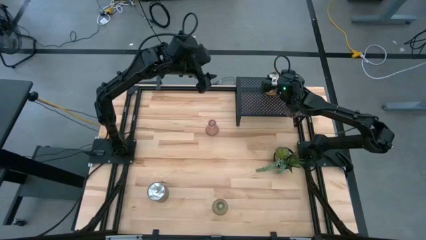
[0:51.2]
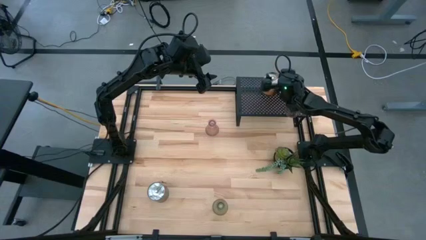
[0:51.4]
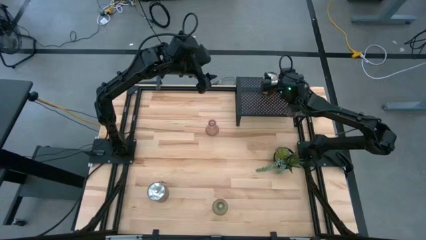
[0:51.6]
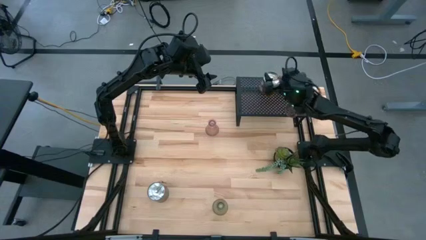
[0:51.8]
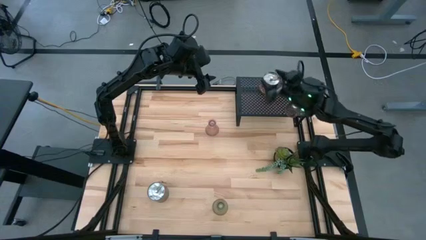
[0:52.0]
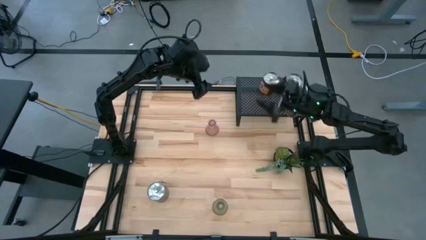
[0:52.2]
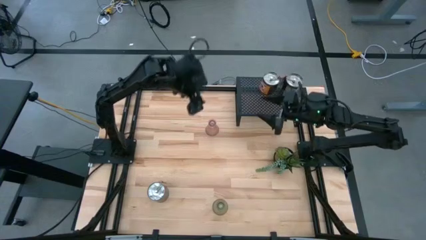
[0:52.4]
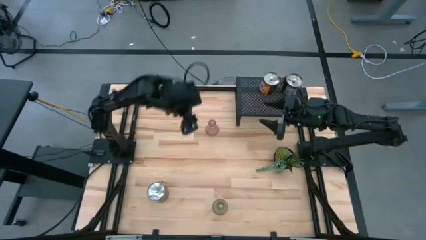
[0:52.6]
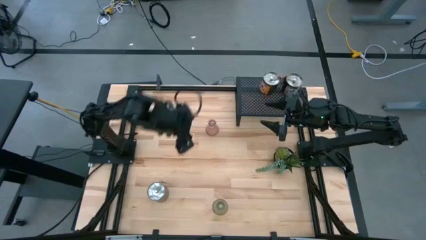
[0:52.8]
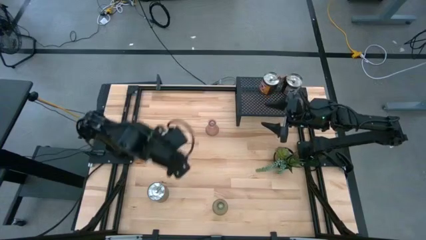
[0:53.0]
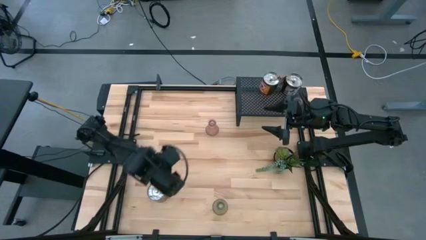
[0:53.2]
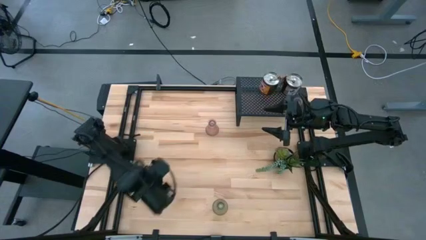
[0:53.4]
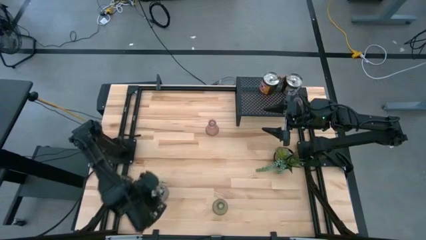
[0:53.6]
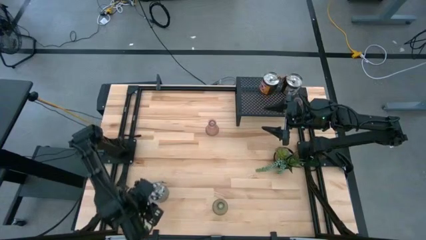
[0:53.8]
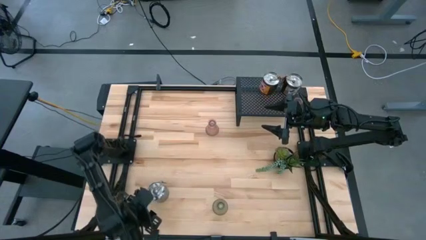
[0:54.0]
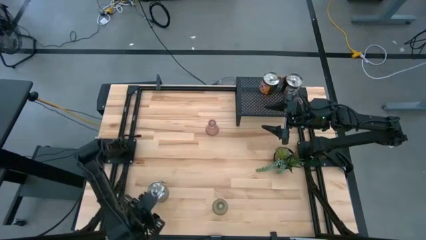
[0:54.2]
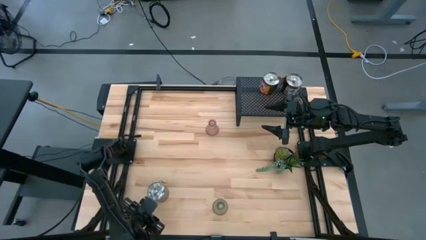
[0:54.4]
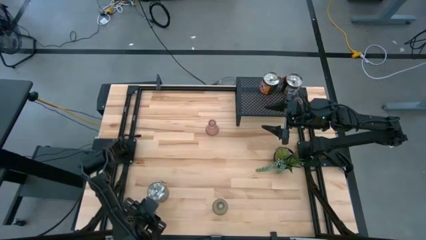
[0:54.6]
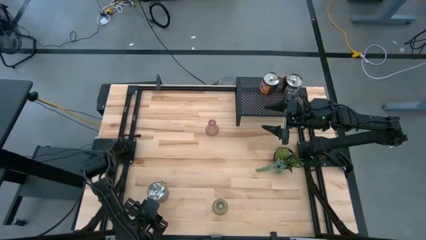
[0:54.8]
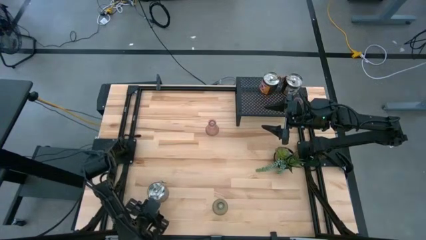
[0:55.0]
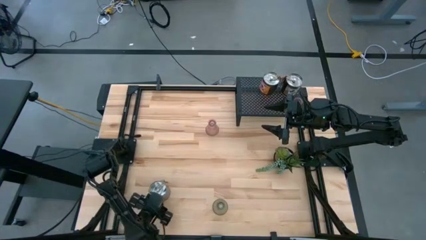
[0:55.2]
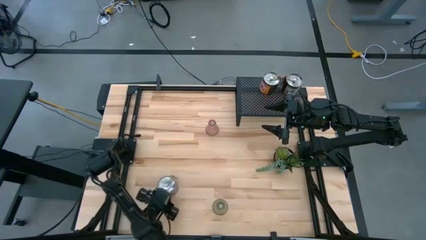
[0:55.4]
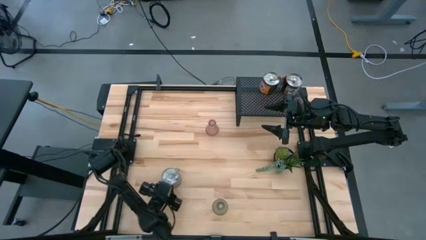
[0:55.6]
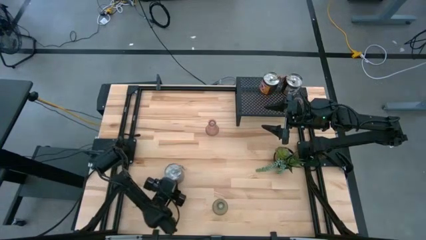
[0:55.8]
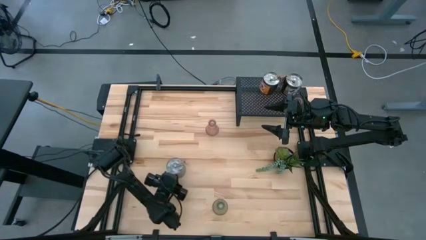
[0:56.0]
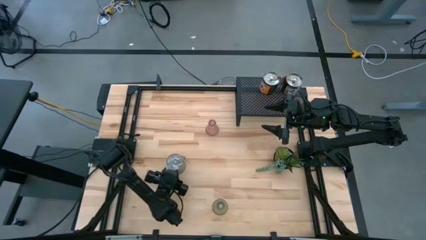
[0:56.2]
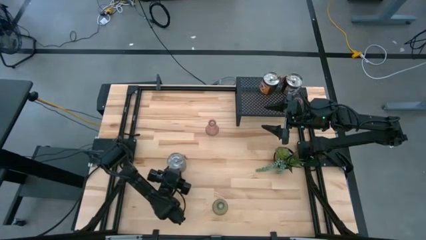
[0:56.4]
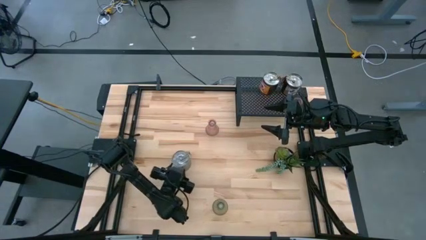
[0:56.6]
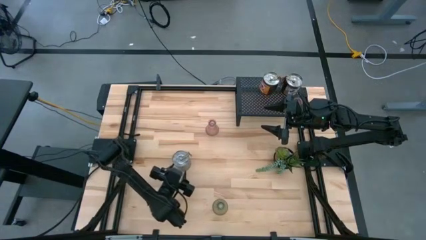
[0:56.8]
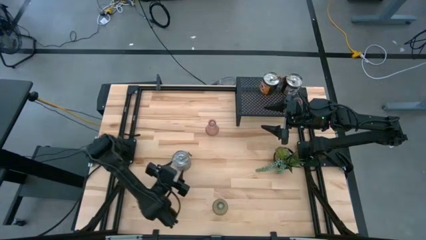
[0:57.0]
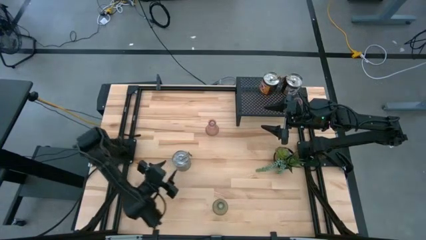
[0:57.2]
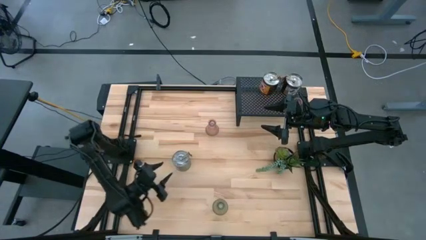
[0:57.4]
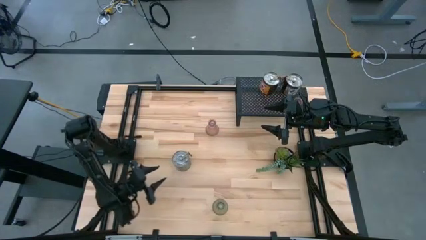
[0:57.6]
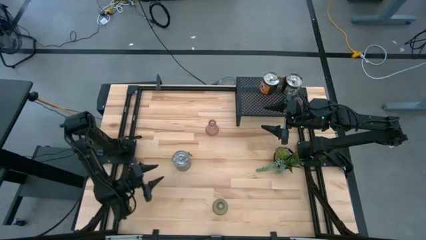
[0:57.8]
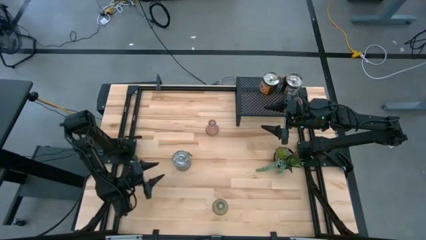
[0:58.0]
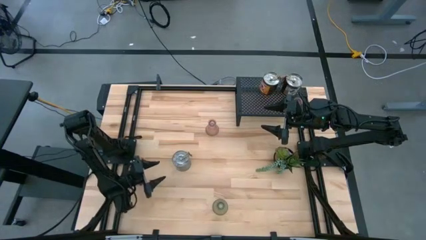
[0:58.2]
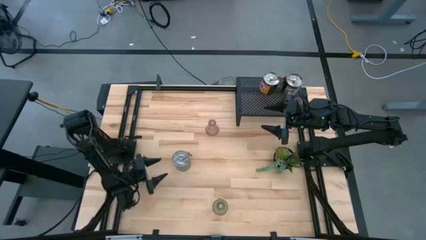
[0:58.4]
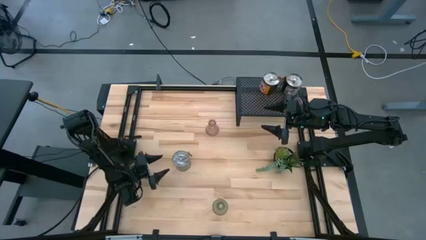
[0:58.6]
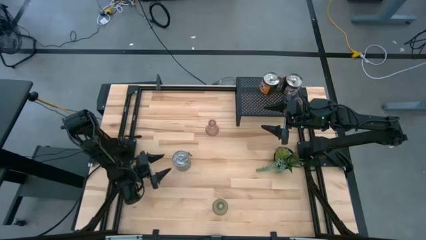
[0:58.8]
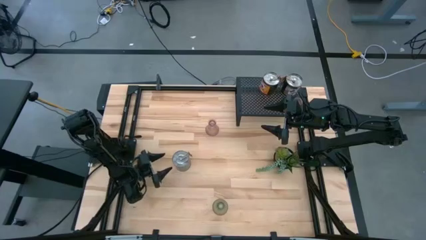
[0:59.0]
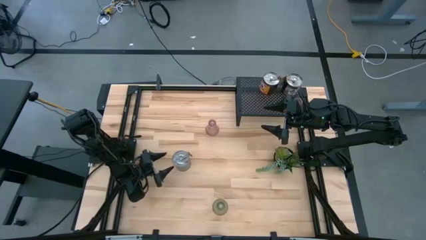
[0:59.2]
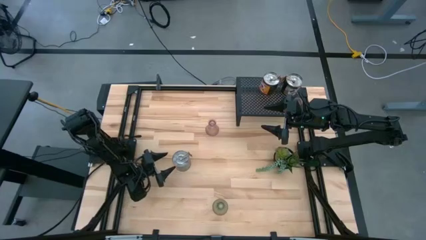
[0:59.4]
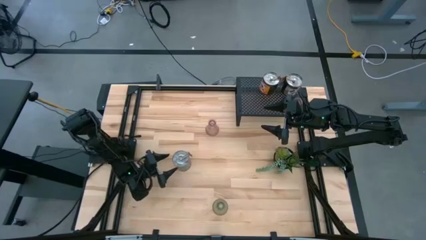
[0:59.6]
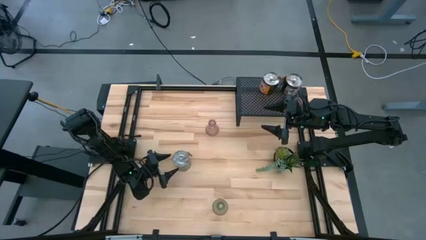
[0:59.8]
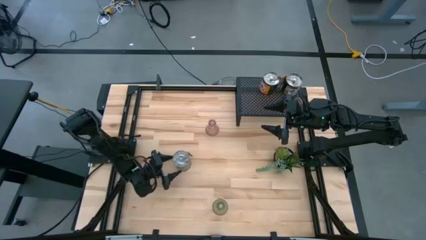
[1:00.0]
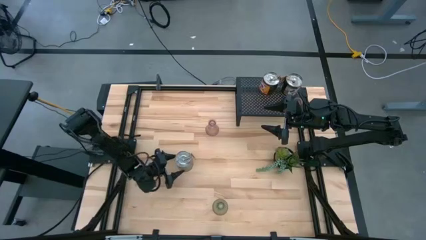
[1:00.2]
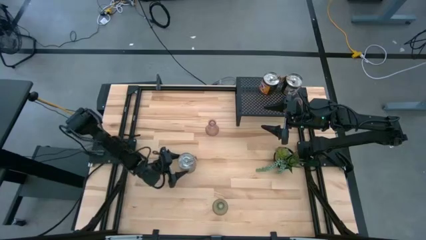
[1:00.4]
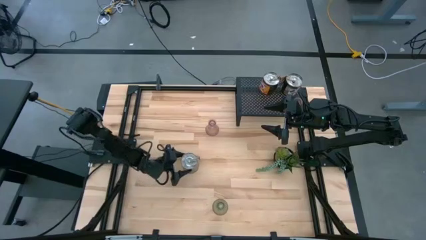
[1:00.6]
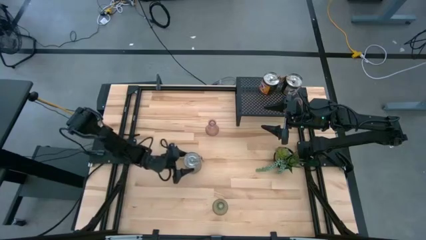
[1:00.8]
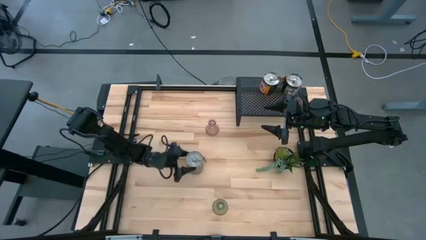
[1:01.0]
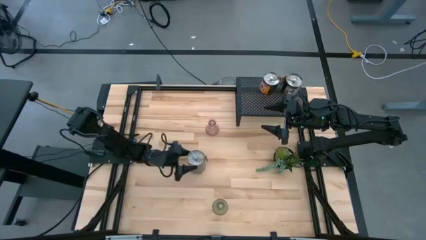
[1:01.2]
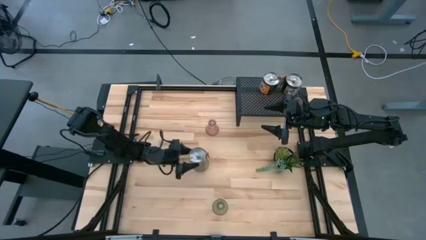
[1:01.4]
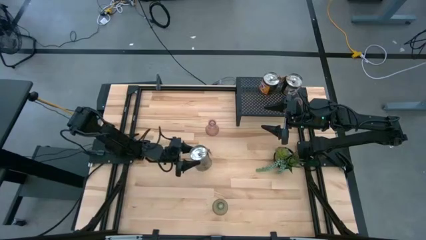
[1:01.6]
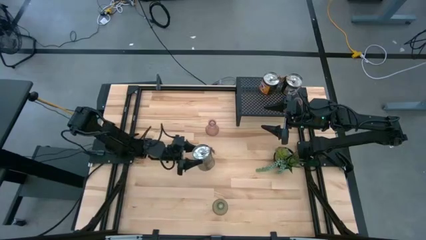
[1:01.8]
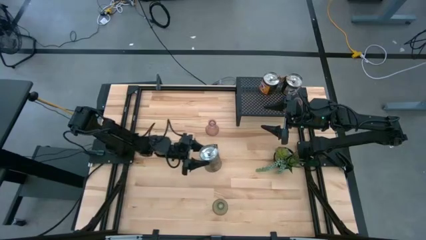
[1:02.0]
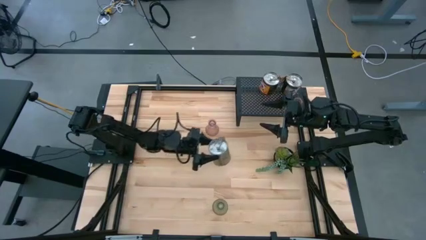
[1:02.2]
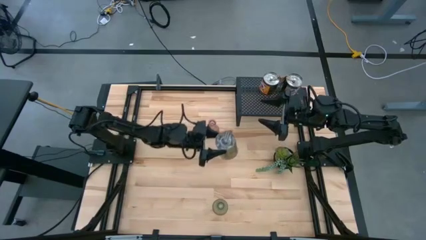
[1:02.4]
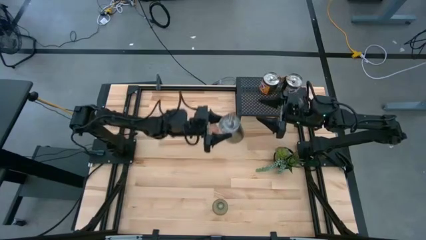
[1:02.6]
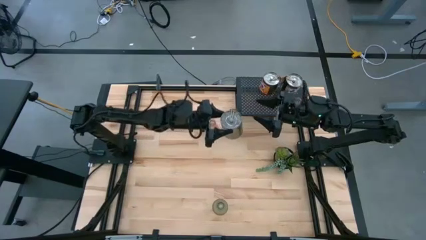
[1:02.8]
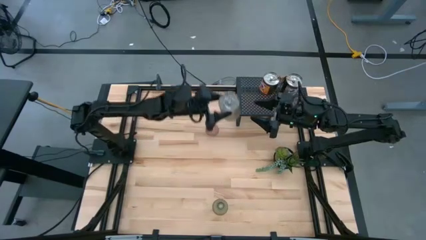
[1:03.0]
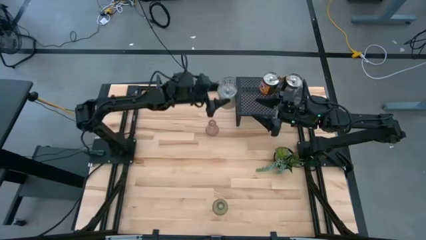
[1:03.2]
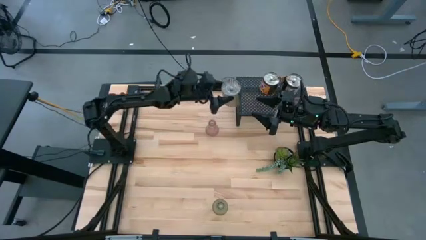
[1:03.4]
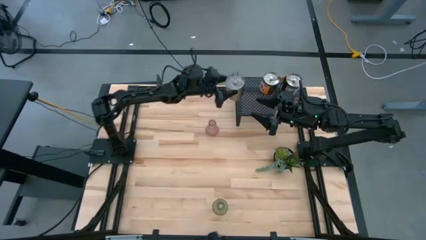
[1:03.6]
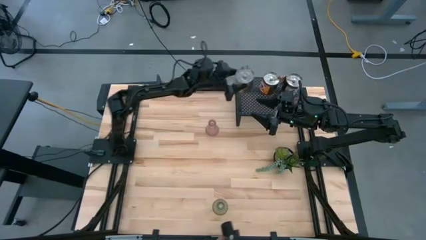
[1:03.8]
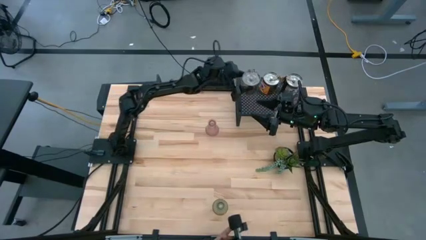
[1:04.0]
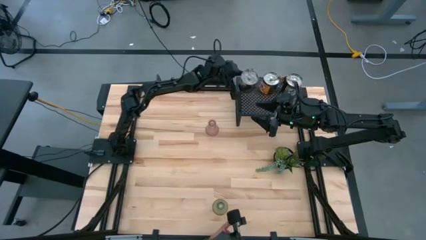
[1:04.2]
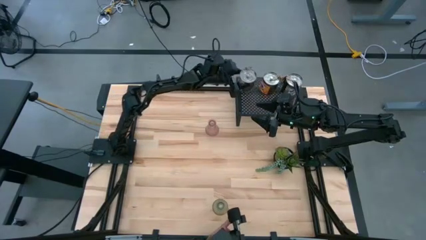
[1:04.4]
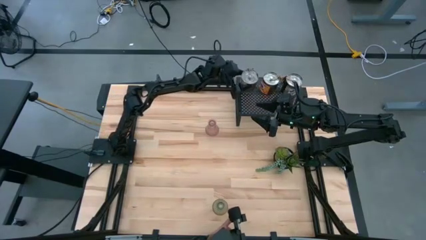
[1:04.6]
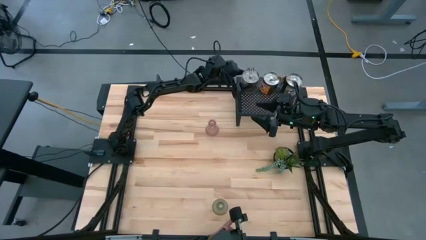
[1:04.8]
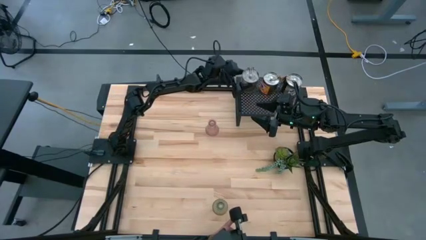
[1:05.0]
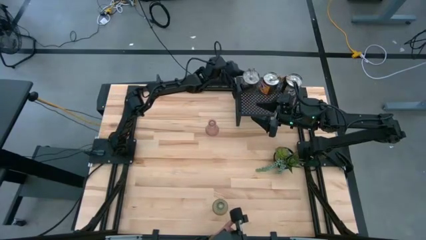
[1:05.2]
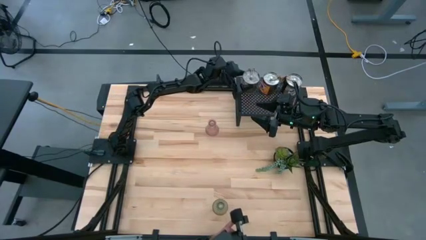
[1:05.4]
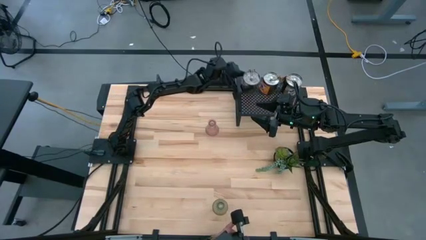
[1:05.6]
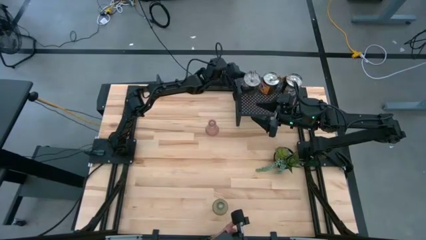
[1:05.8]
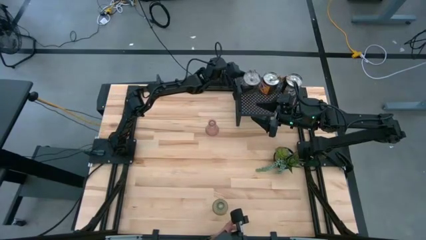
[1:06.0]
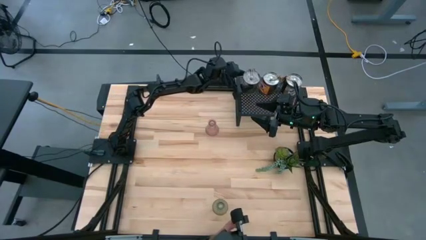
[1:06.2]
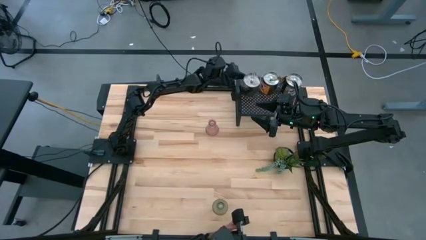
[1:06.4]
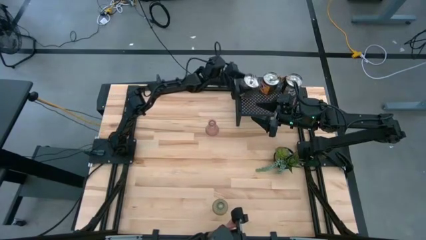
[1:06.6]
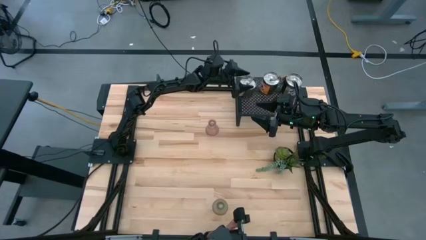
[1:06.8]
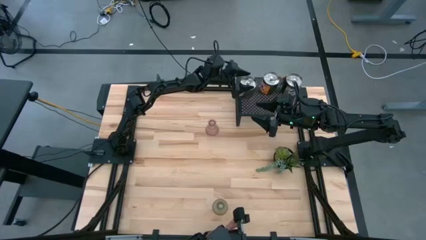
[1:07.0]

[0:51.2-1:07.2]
Task: Pick & Place candle stick holders
Put the silver scented candle on the shelf aligned with the silver scented candles
